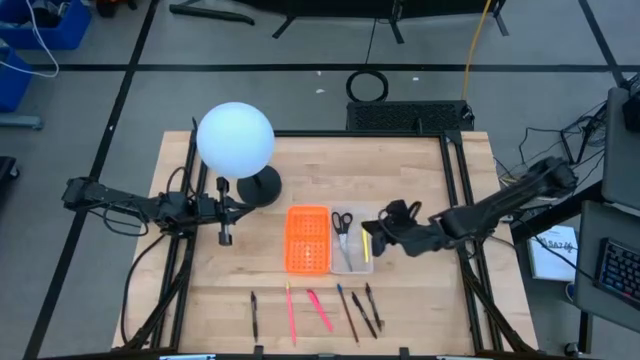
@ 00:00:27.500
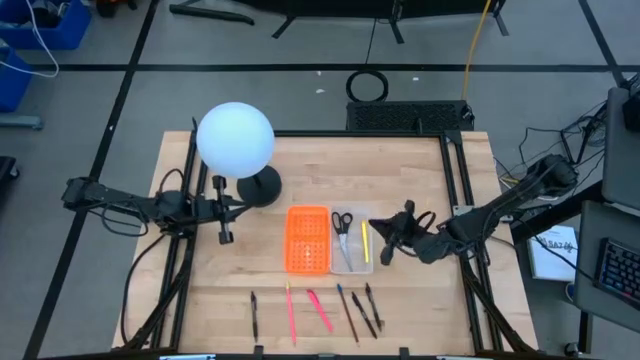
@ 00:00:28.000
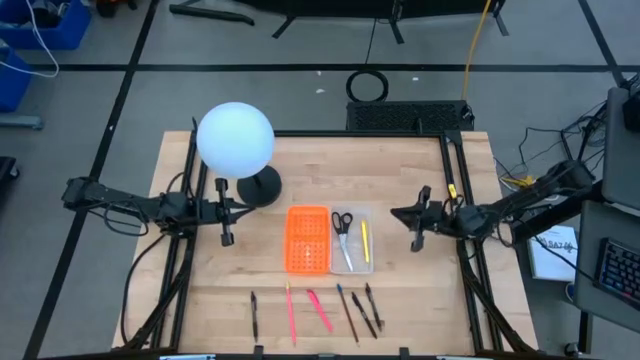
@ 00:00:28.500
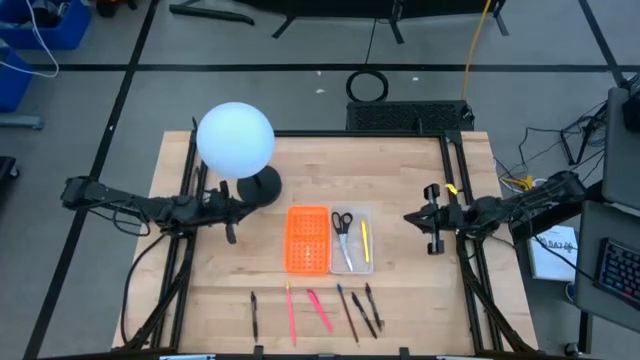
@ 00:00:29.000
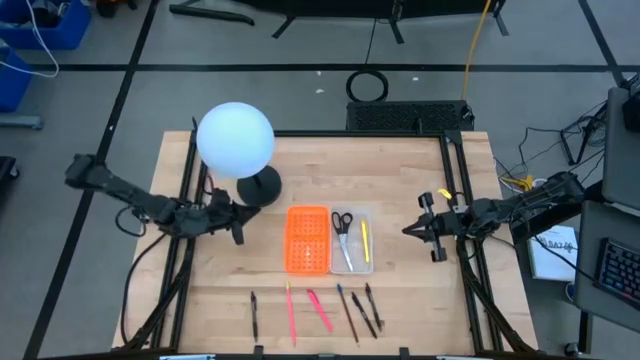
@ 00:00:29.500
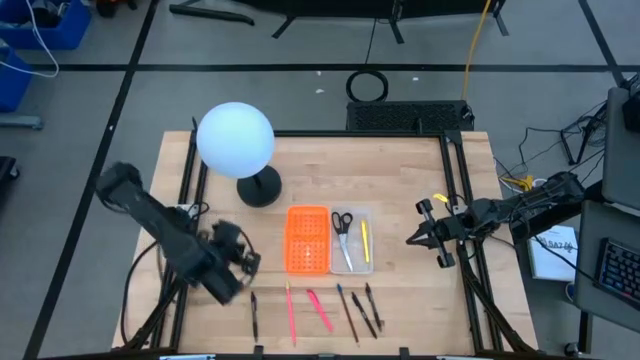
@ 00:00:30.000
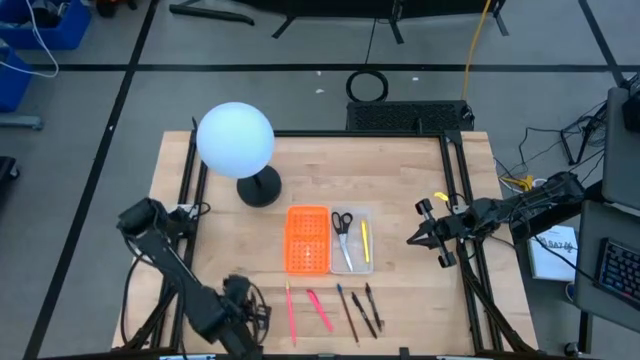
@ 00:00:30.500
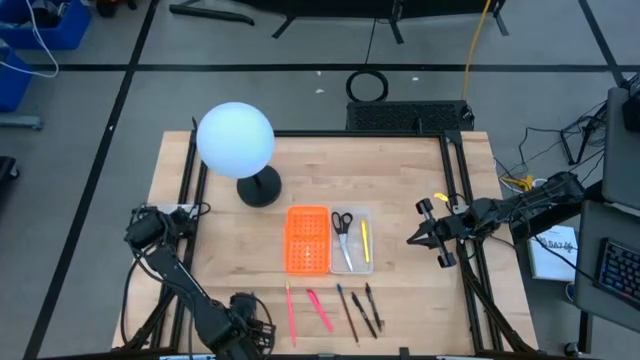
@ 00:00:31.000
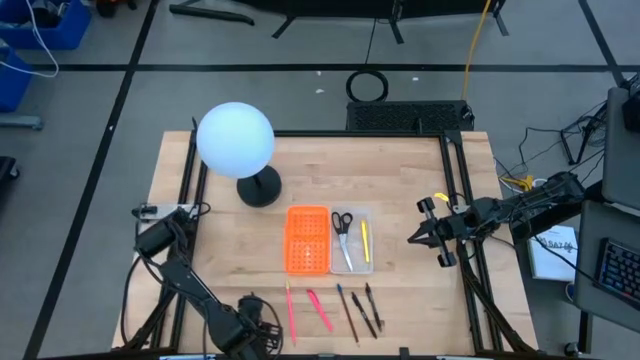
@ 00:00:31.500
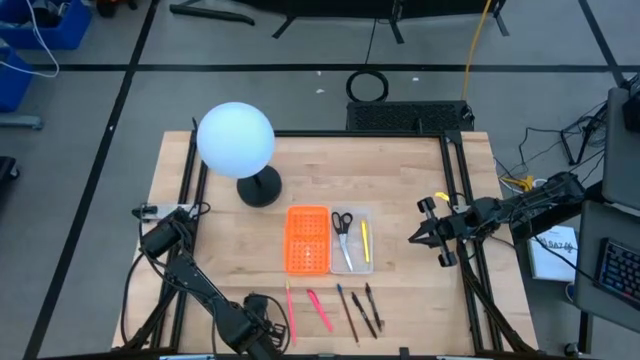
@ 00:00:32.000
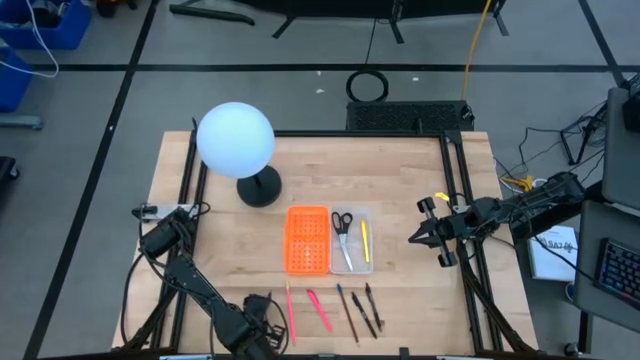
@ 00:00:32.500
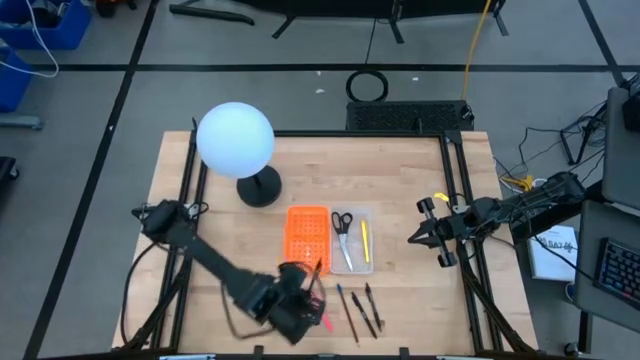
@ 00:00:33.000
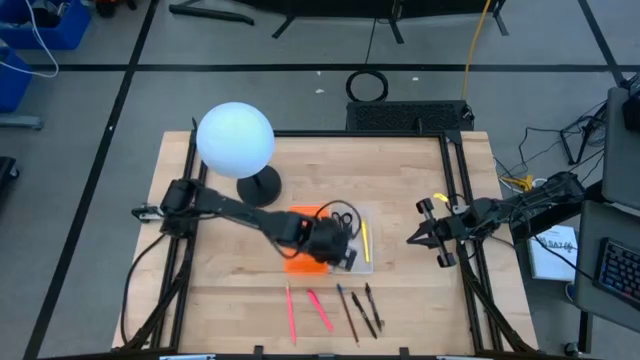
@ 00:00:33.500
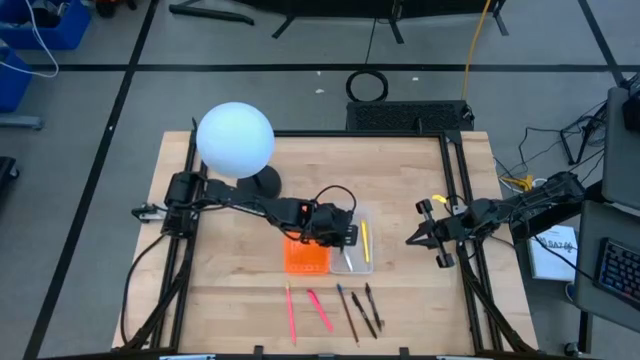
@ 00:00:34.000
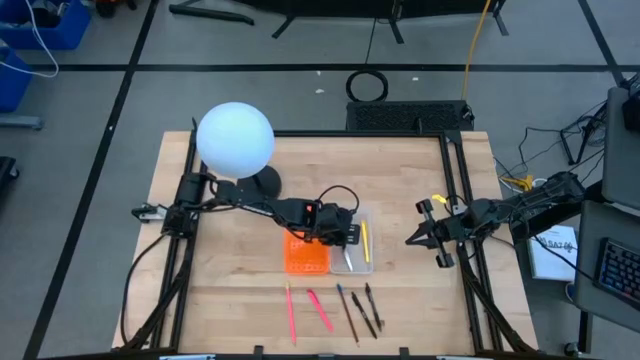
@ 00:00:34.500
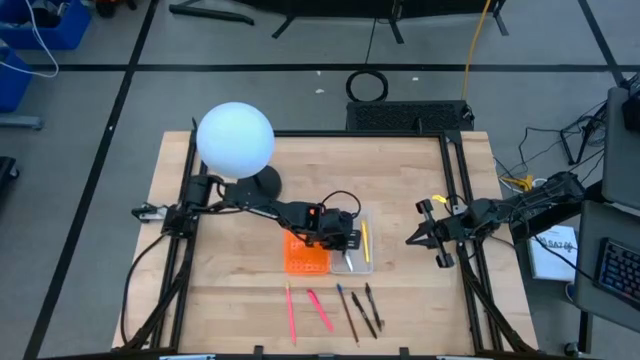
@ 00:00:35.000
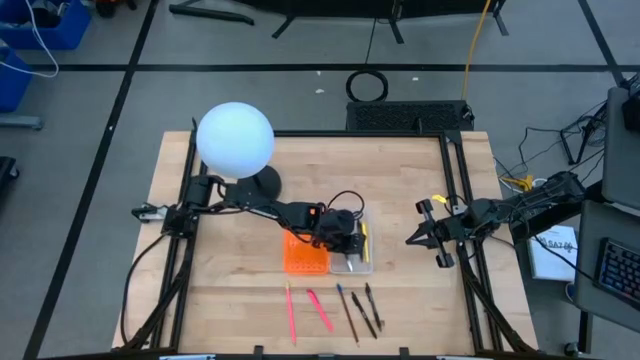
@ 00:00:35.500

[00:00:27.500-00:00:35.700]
Task: Pick & place school supplies into a supply box
Put the left black pen into the transparent bin

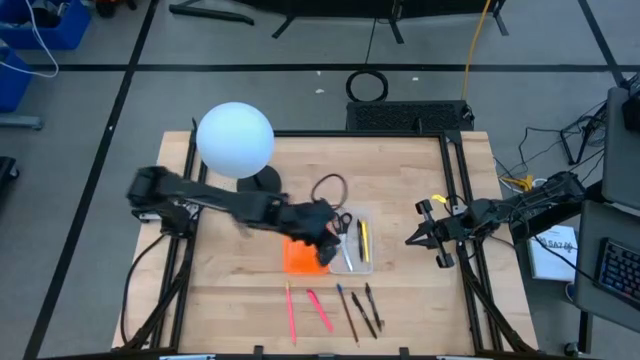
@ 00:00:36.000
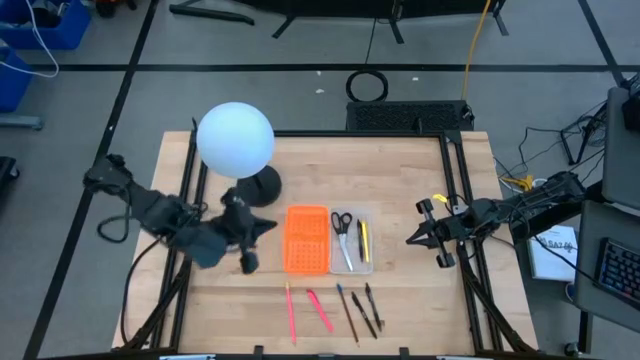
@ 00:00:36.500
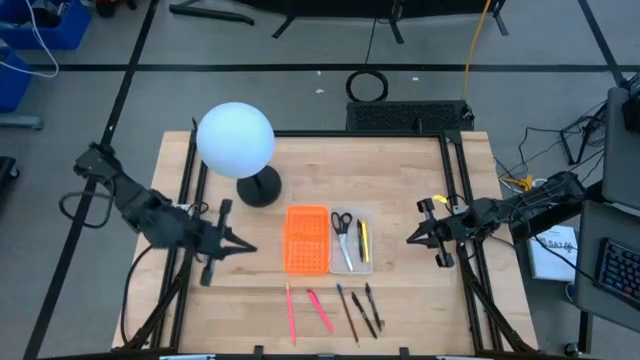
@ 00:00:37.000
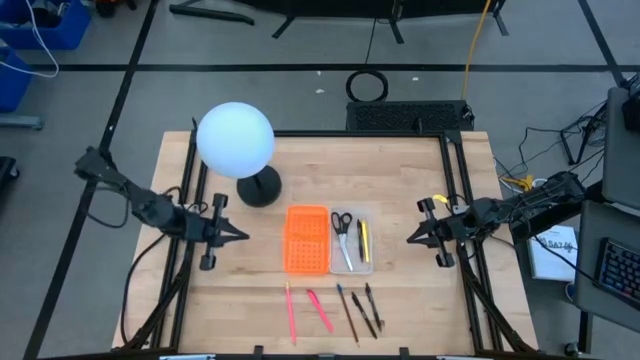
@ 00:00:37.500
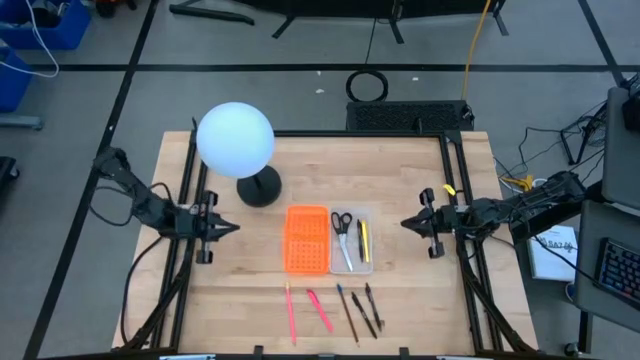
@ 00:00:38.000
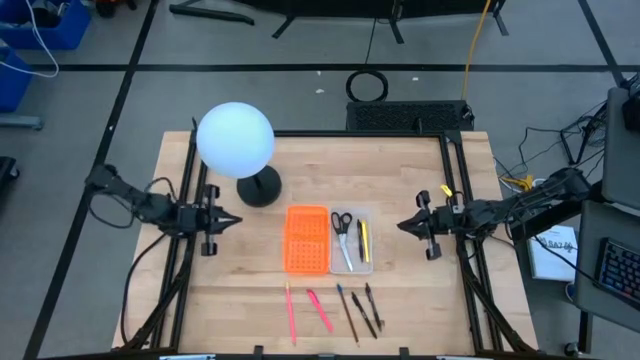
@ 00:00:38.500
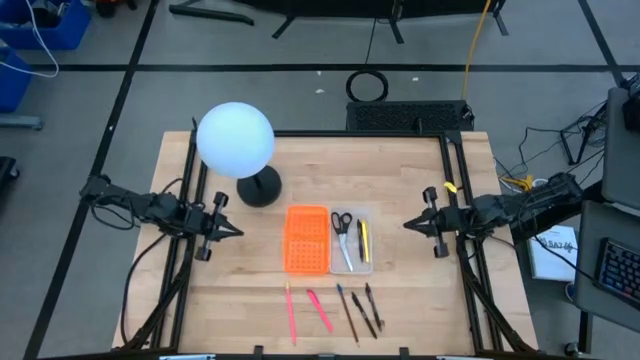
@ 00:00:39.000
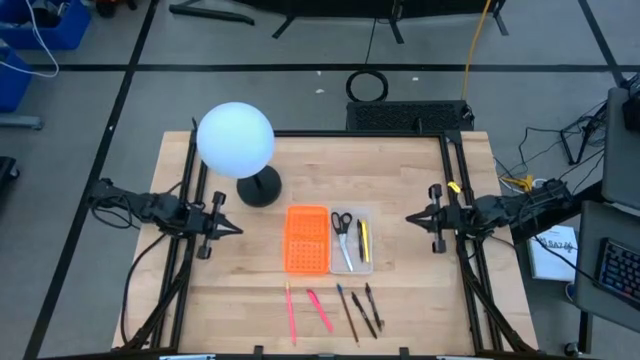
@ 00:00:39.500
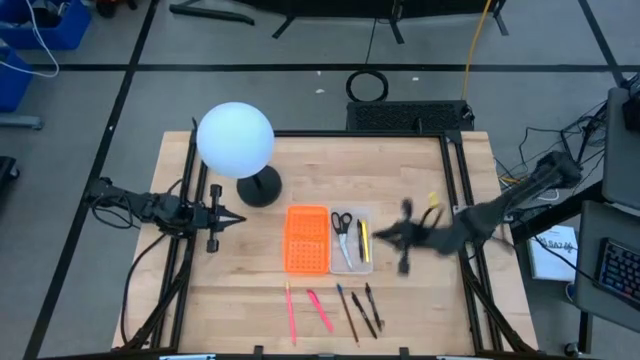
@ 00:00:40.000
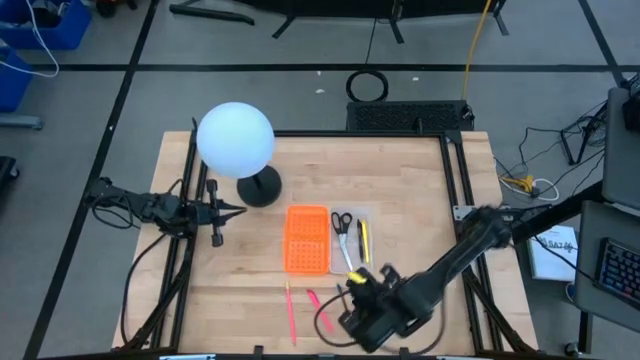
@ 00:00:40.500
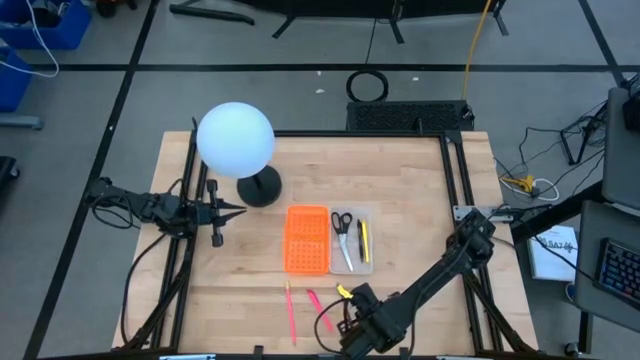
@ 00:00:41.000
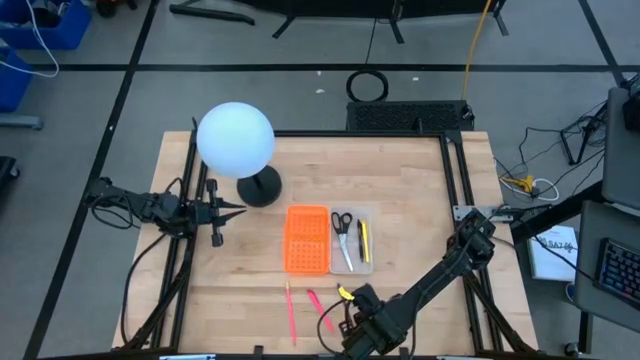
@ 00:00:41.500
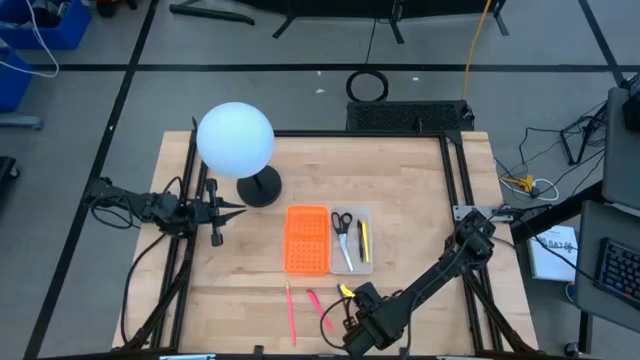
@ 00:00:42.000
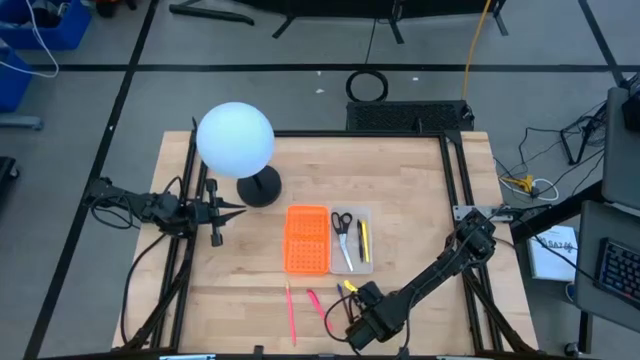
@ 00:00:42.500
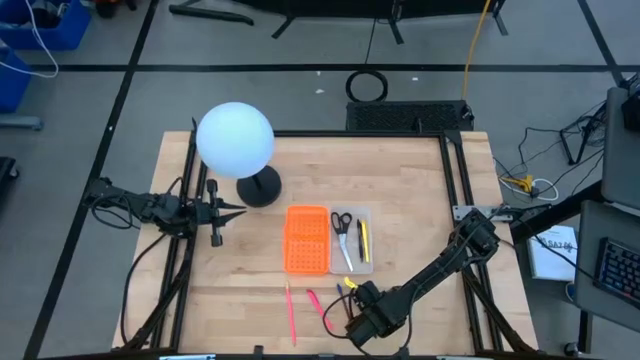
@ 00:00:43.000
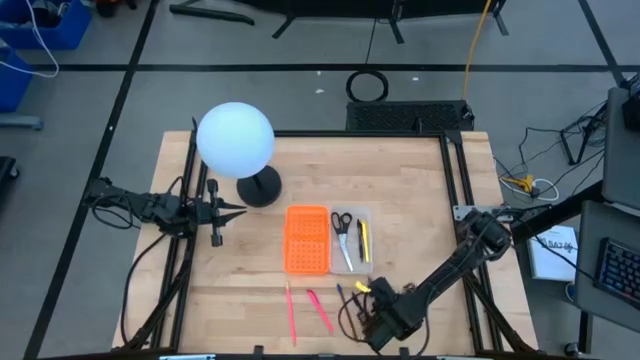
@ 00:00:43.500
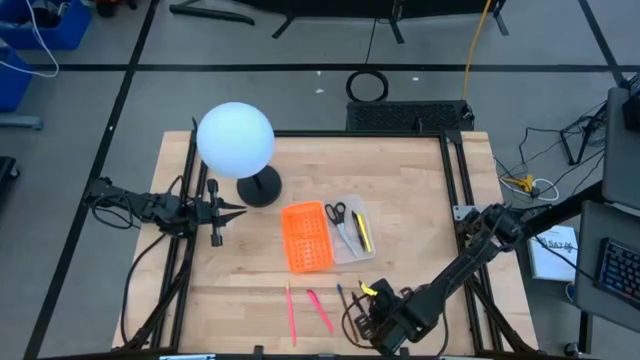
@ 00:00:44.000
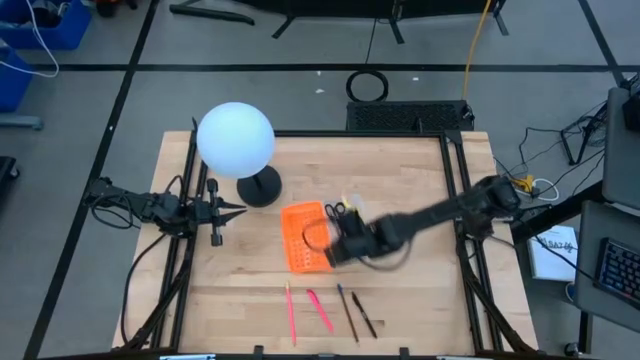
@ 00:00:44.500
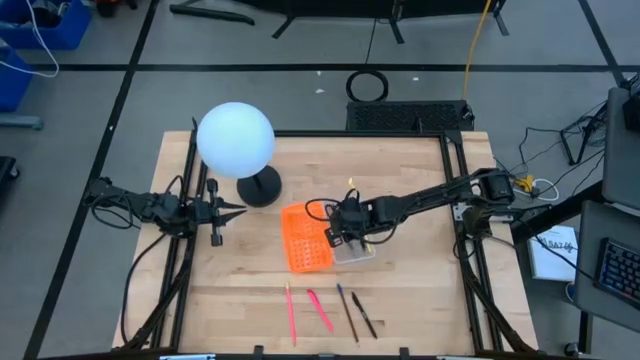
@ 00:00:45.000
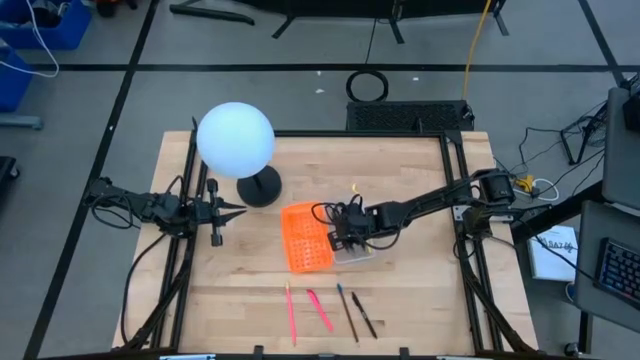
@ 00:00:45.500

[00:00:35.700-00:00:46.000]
Put the right black pen into the transparent bin

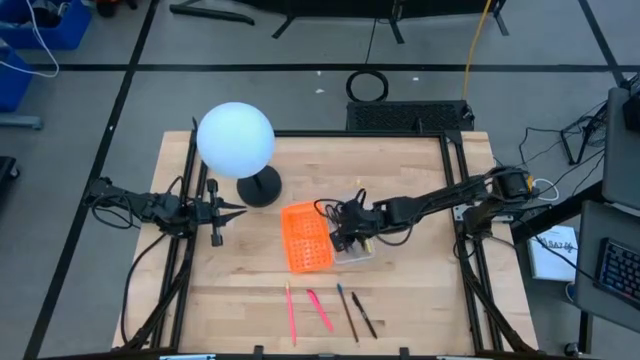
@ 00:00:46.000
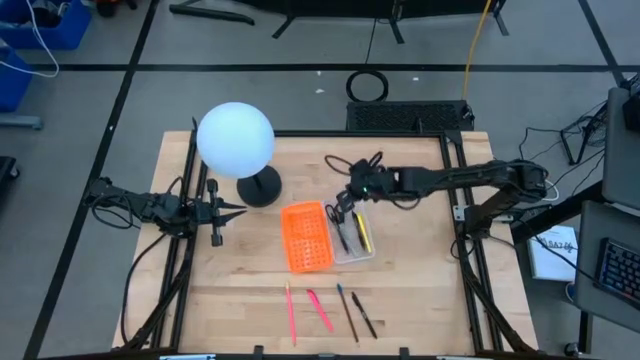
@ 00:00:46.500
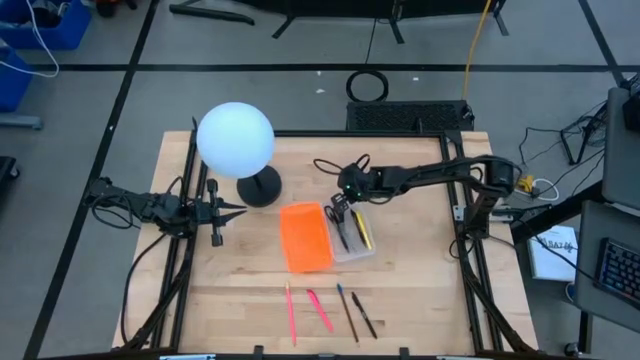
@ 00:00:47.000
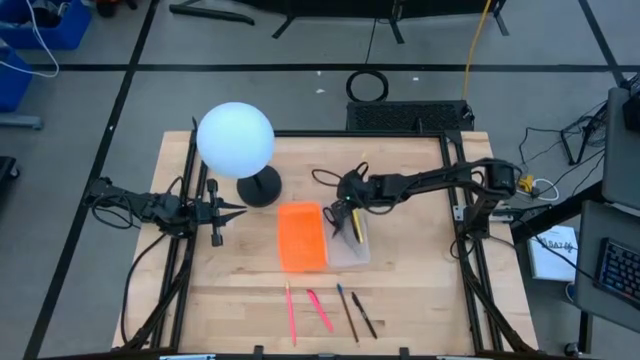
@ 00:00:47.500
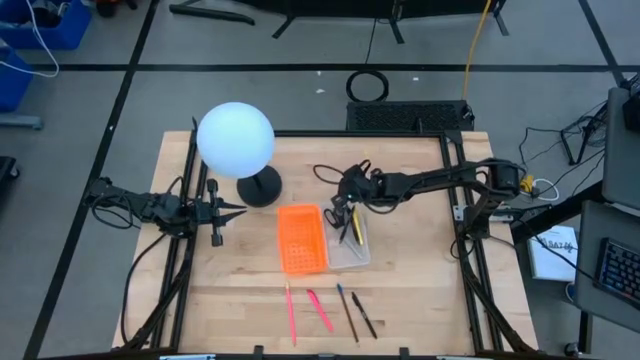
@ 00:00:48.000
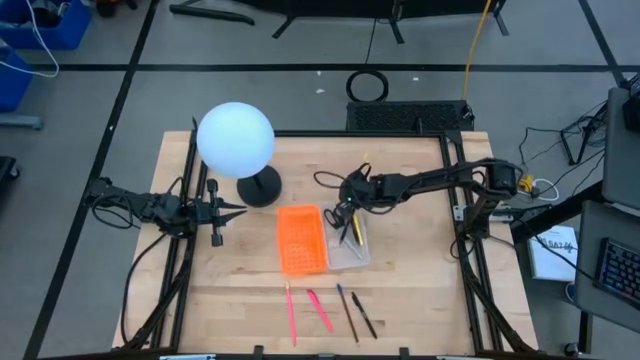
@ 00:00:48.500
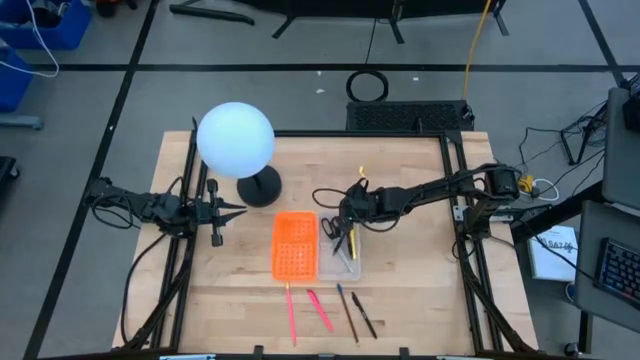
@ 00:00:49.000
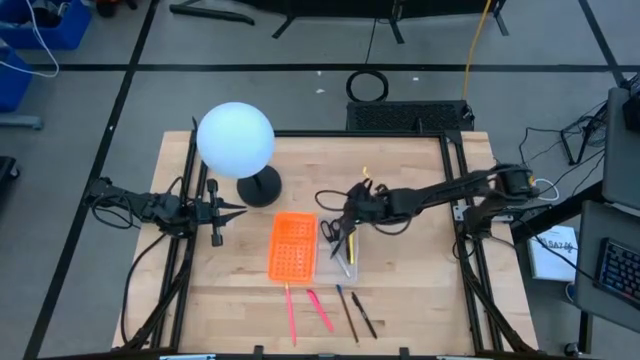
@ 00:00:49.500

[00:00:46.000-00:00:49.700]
Adjust the orange bin
